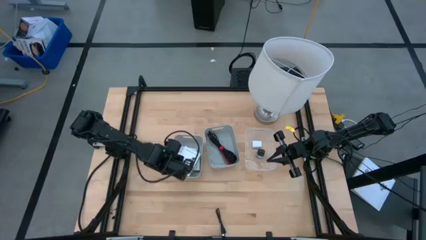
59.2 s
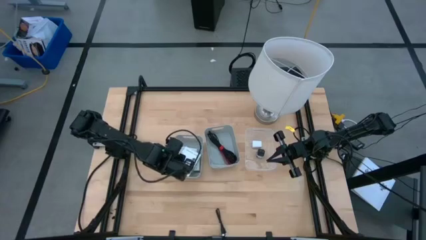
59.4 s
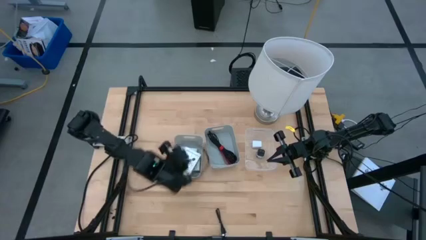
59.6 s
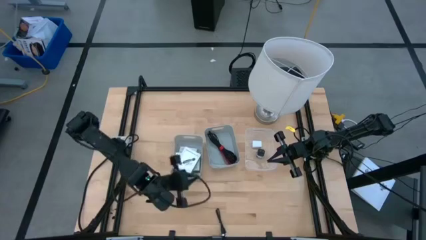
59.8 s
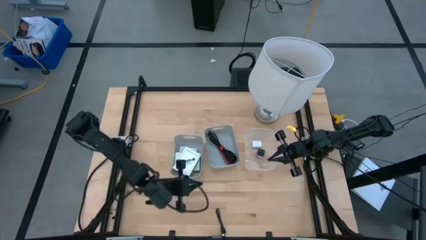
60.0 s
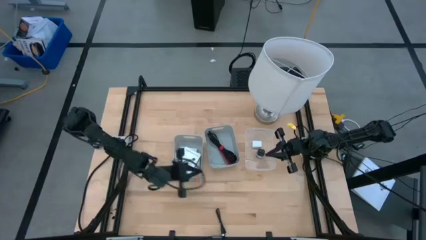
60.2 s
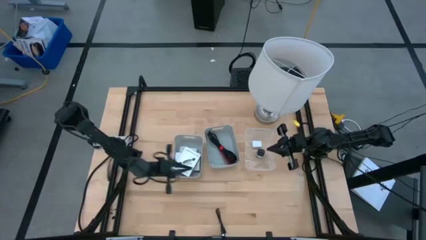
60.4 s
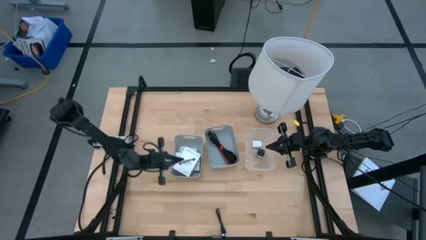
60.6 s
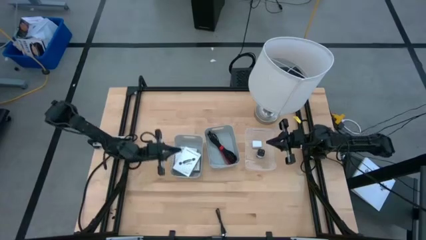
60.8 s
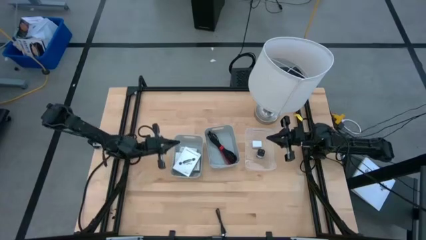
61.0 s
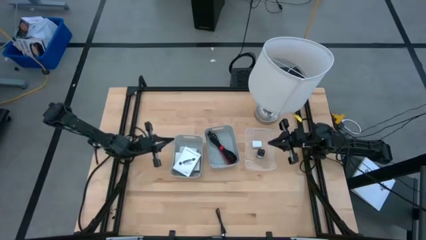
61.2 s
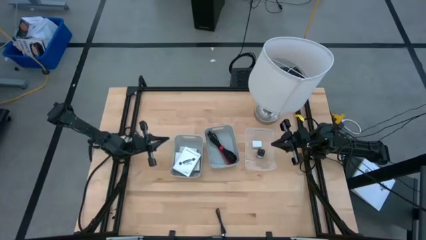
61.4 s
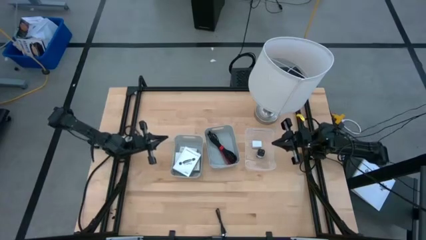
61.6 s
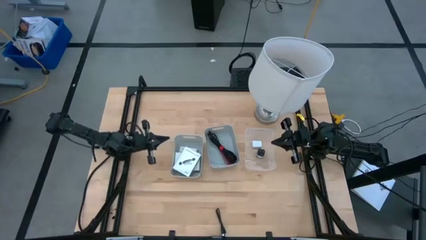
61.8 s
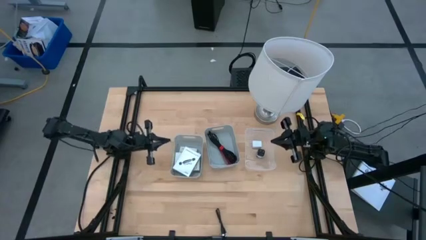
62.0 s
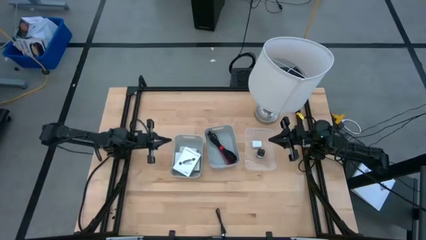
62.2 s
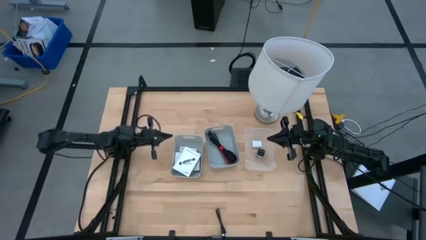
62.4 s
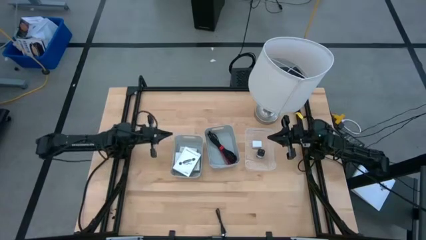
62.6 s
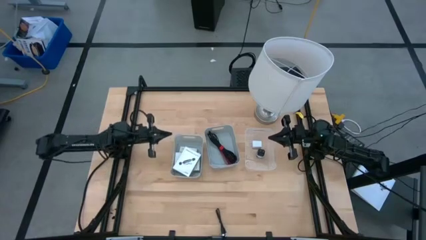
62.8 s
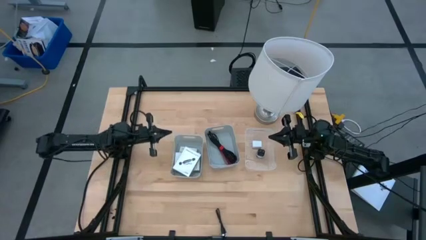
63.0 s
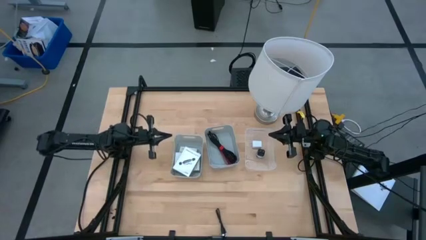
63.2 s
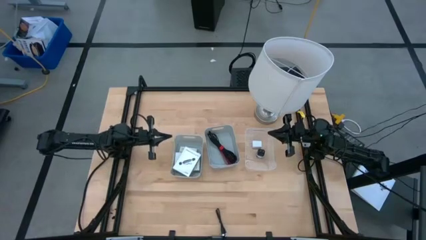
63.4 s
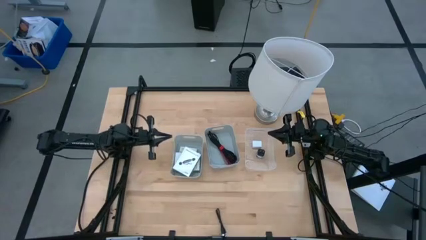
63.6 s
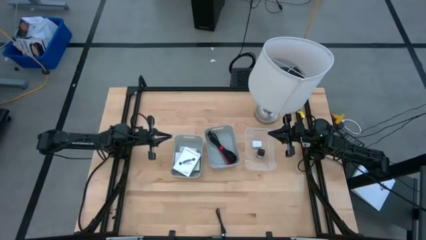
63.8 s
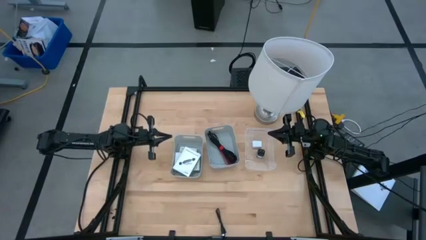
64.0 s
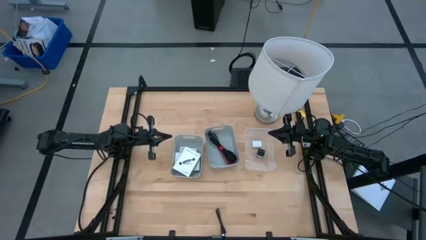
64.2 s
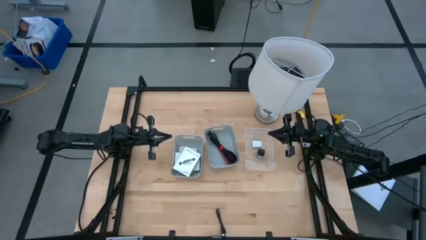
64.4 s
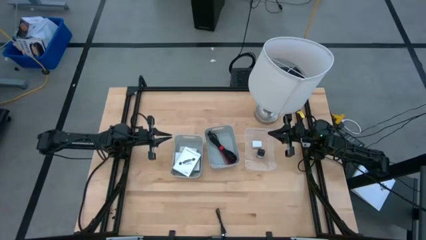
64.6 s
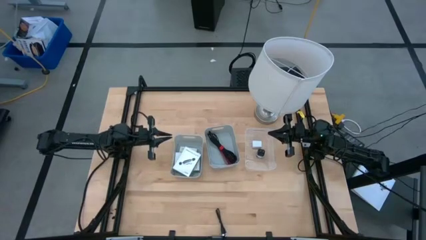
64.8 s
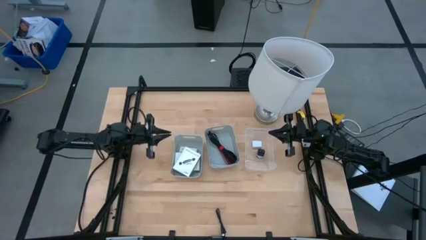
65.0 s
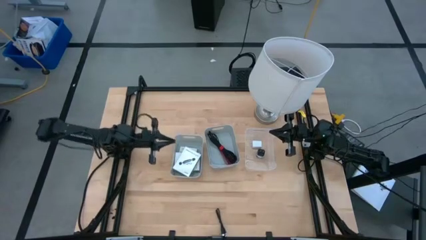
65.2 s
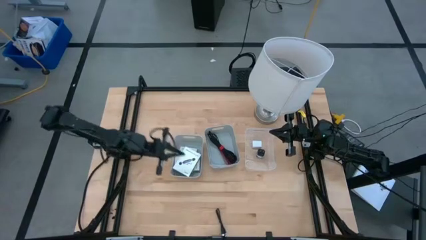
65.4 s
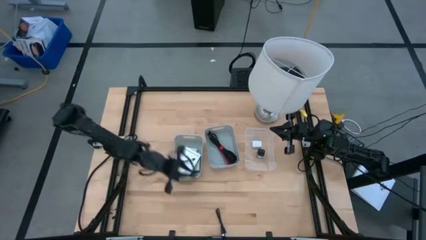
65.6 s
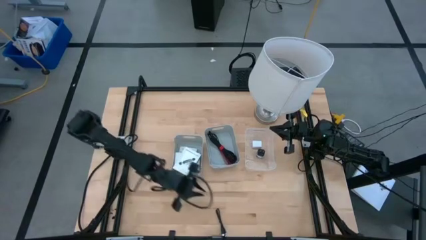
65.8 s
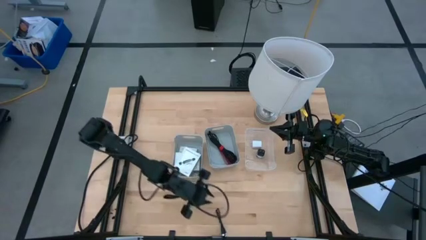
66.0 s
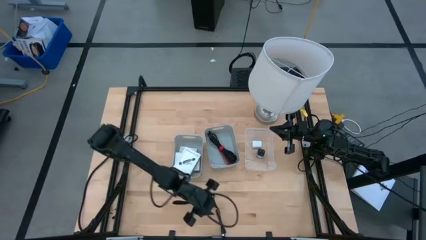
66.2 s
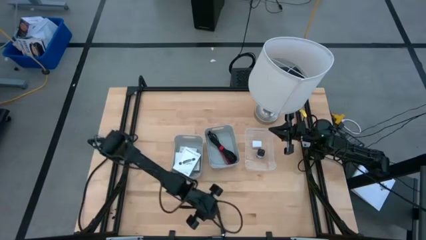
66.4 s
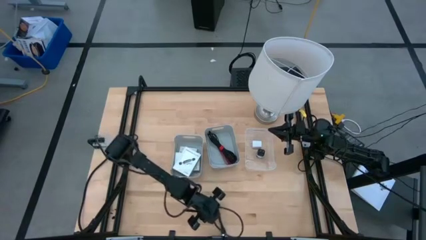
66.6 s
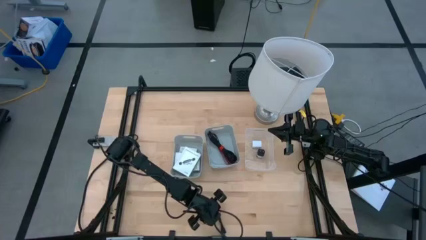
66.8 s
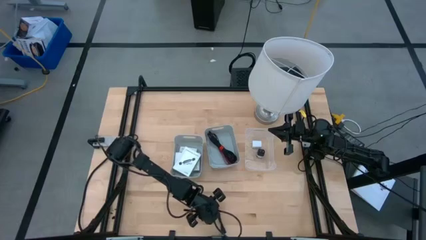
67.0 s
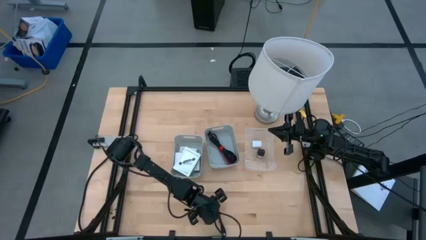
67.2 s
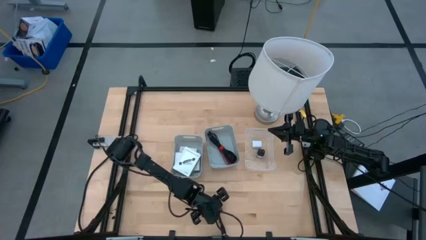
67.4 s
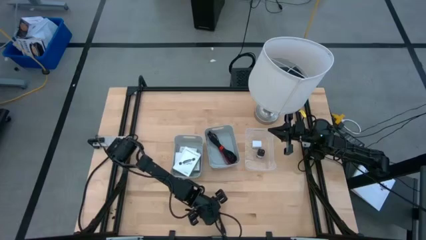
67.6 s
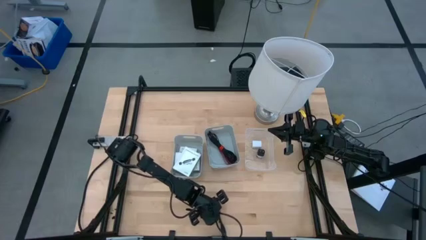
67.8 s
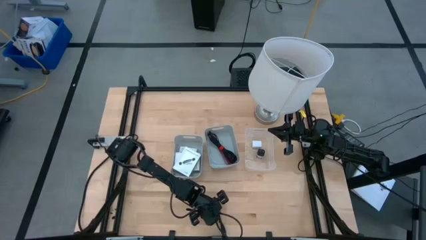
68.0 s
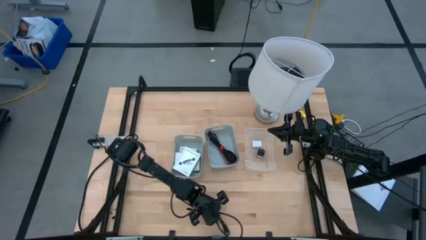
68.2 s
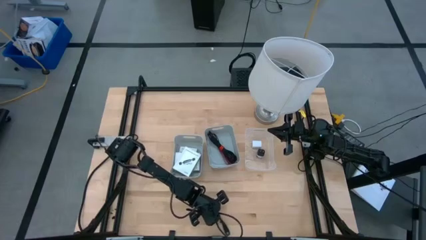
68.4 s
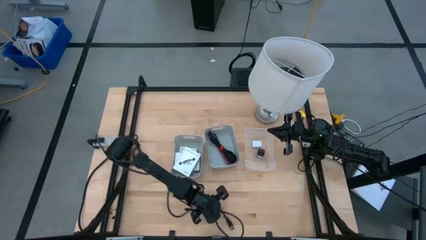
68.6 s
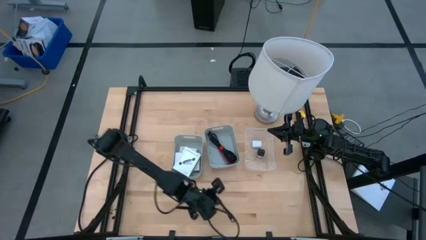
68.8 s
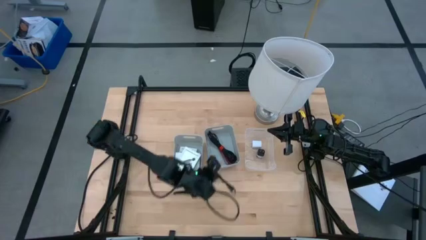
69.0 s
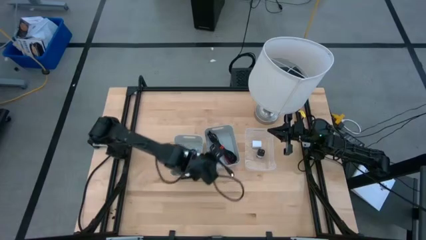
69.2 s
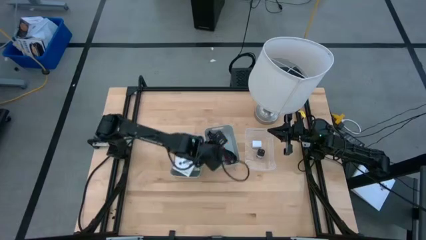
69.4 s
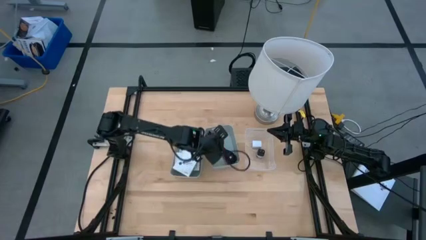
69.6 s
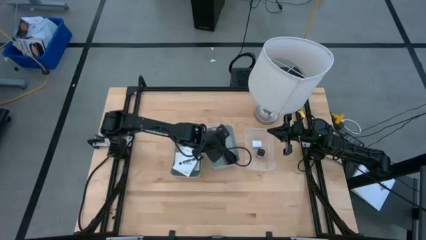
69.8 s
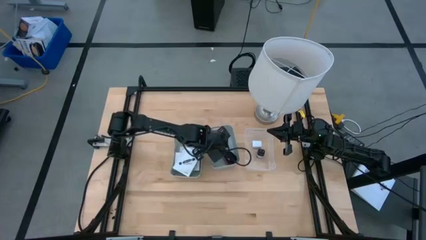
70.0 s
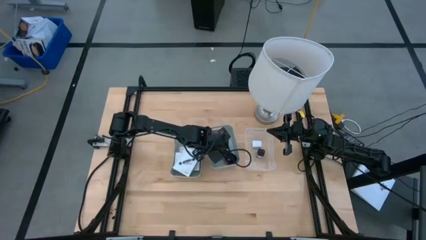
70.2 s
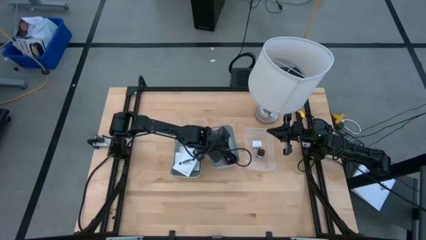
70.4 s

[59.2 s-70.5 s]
Task: Pick and place items into bin
Put the black charger cable into the right gray bin

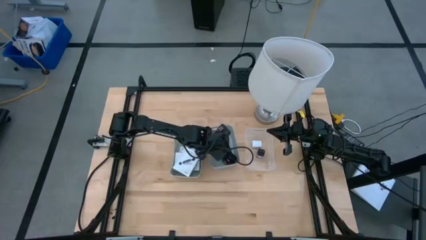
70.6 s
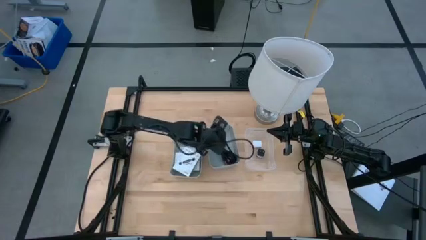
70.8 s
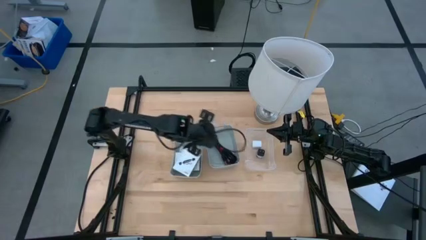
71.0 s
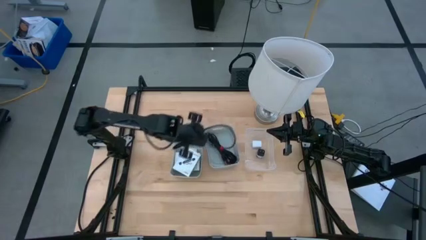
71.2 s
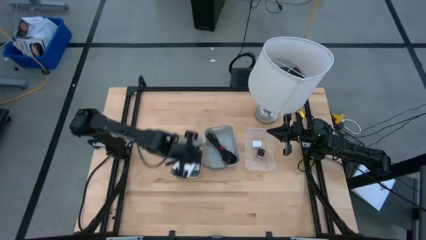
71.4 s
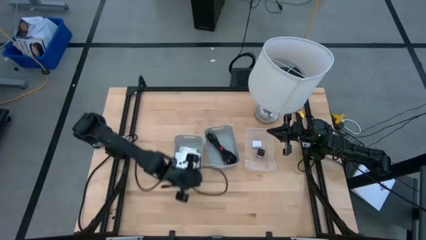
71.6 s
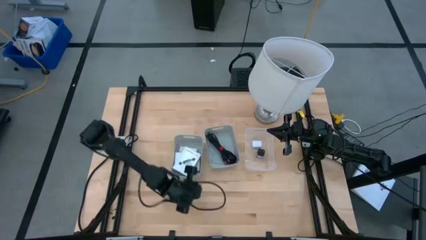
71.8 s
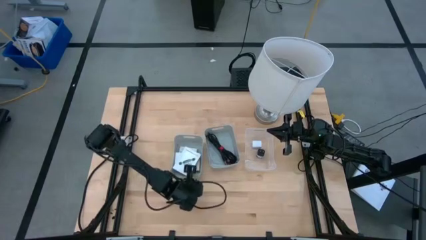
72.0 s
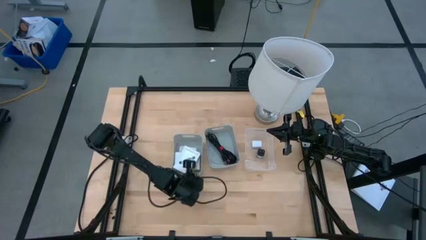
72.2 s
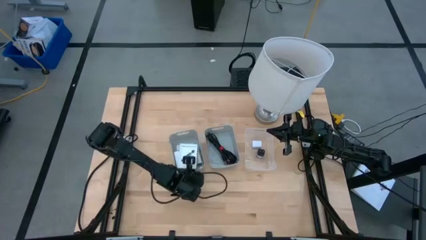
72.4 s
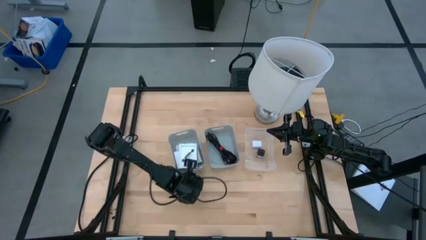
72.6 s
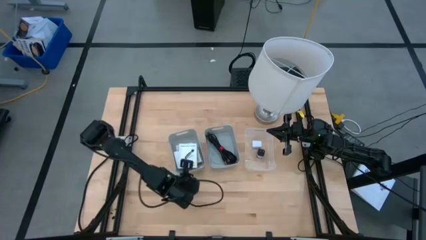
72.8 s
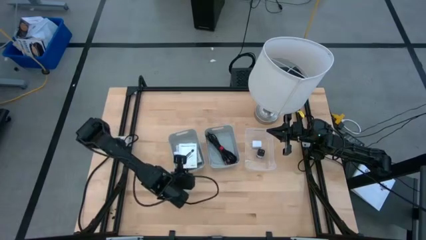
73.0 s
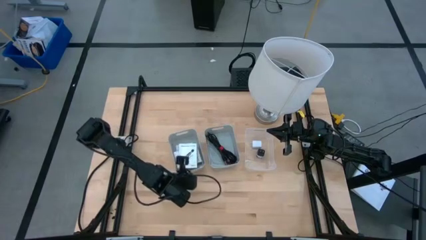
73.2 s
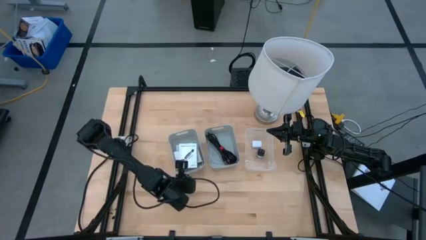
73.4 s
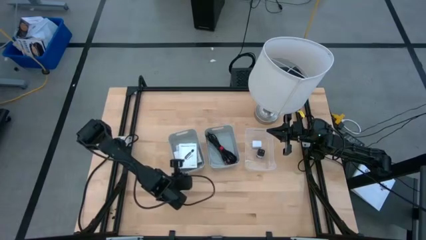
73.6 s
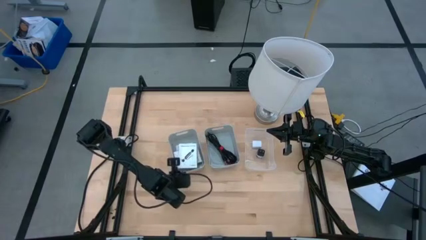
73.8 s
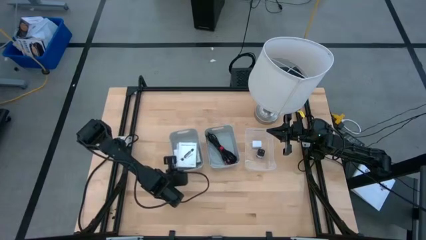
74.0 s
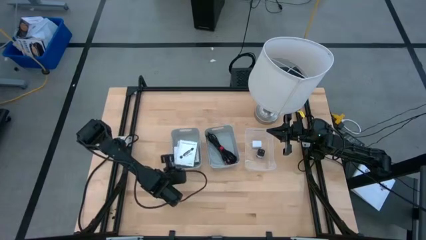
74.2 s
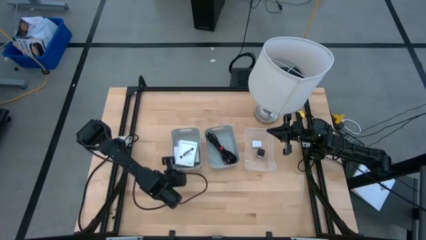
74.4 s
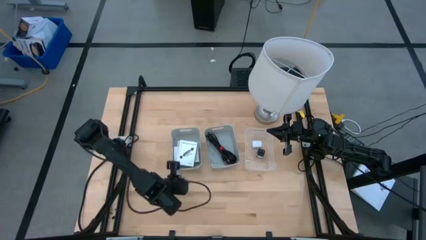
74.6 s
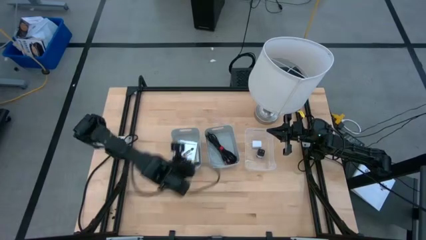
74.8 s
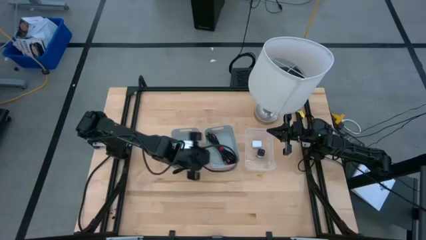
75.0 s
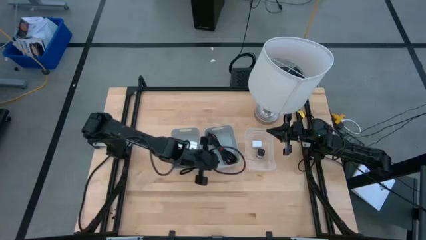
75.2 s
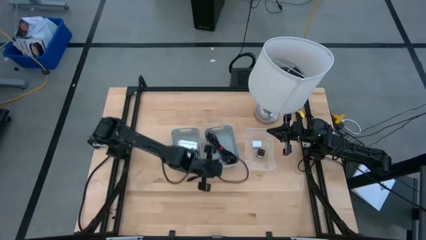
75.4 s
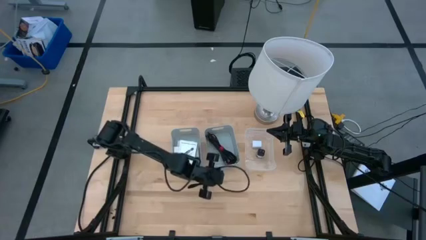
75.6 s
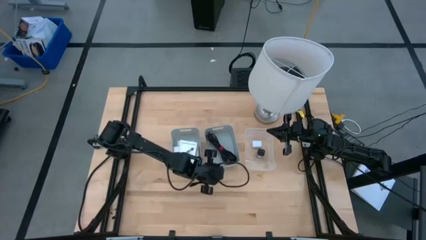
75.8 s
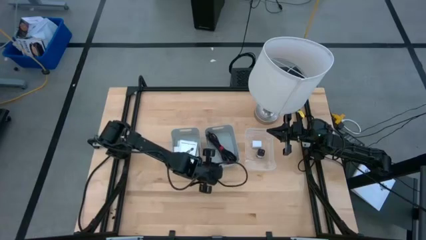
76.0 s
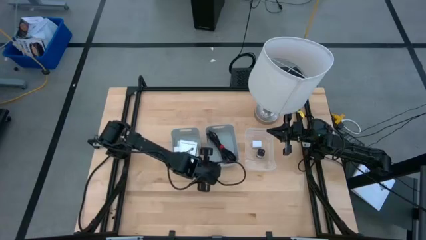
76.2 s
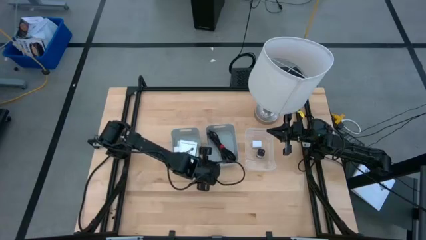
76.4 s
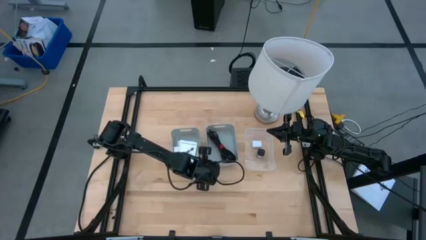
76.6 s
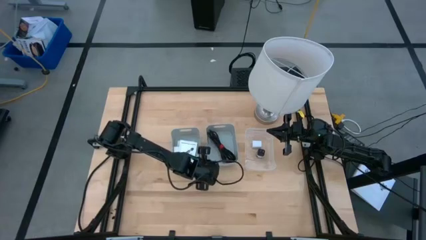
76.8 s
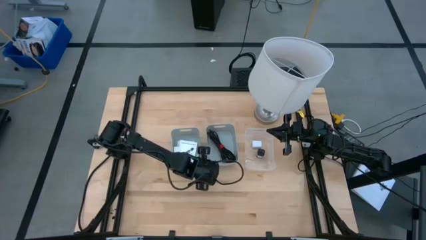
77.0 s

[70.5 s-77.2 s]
Adjust the gray bins on the table
